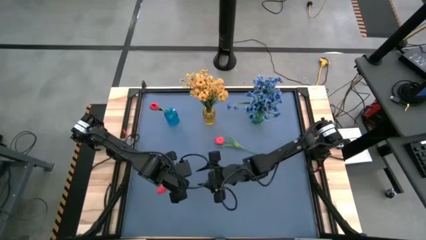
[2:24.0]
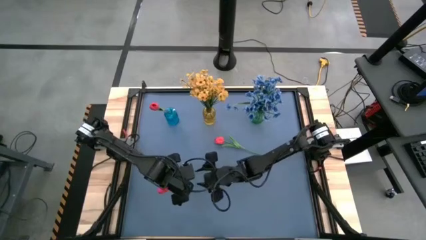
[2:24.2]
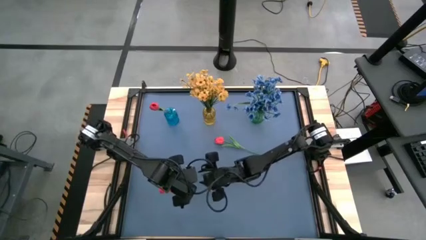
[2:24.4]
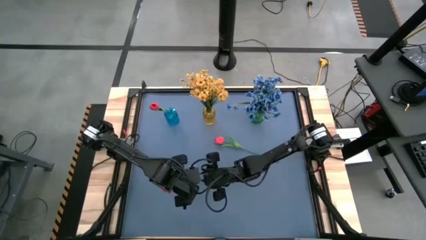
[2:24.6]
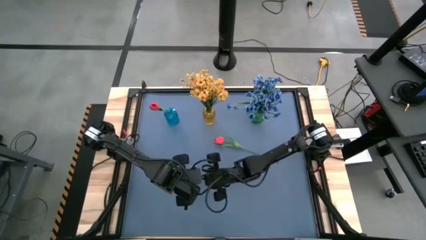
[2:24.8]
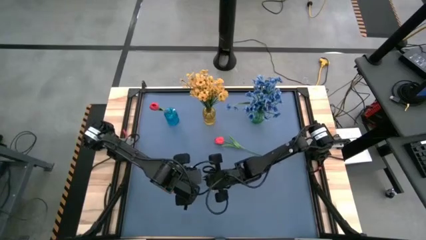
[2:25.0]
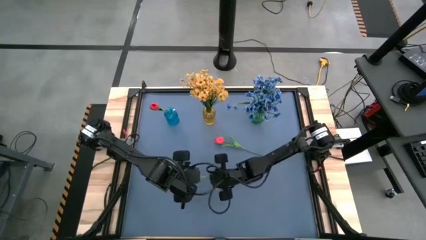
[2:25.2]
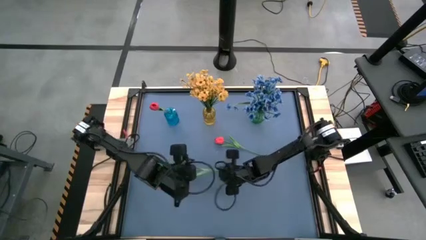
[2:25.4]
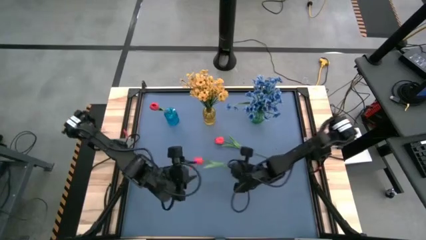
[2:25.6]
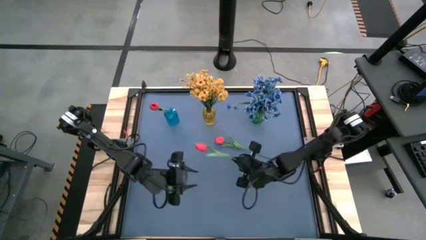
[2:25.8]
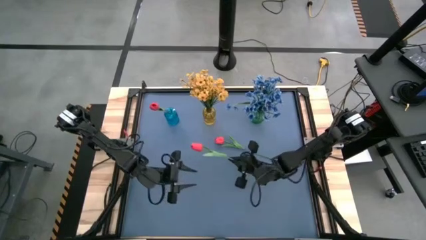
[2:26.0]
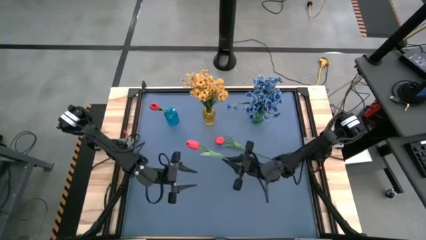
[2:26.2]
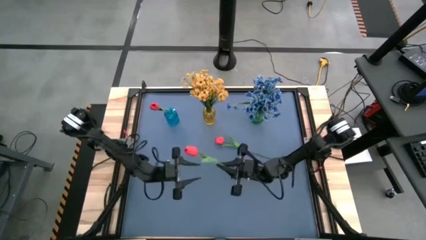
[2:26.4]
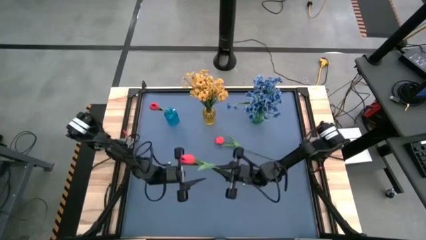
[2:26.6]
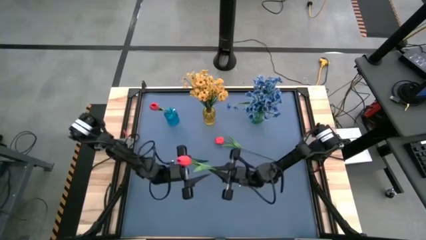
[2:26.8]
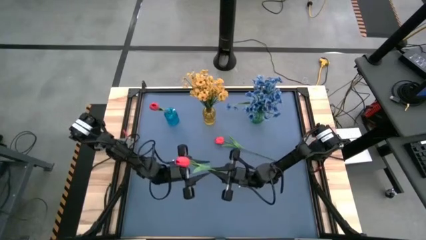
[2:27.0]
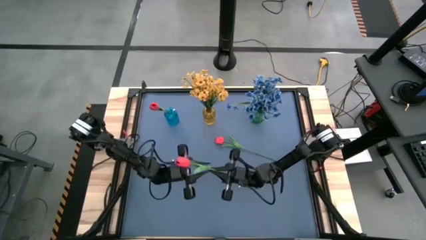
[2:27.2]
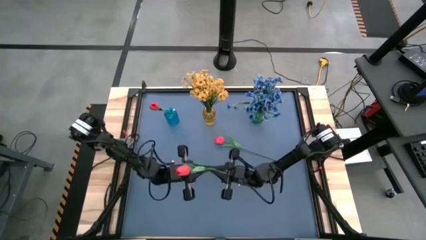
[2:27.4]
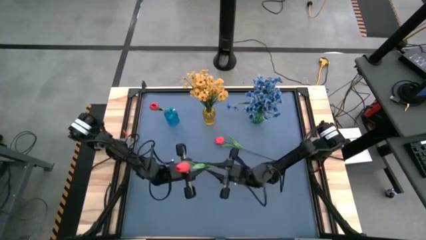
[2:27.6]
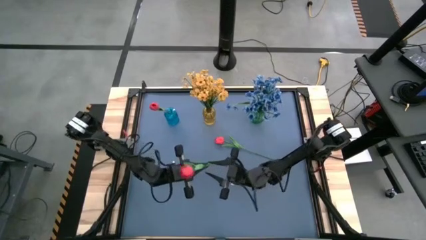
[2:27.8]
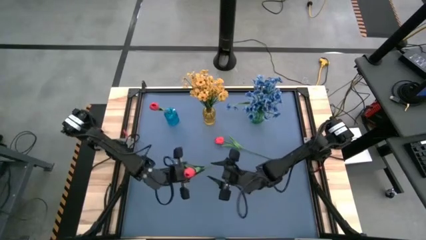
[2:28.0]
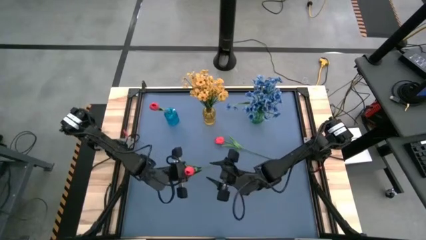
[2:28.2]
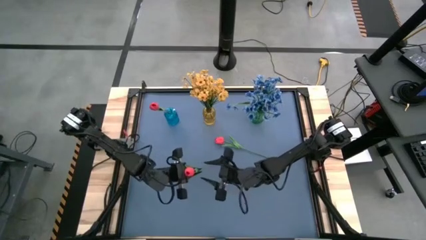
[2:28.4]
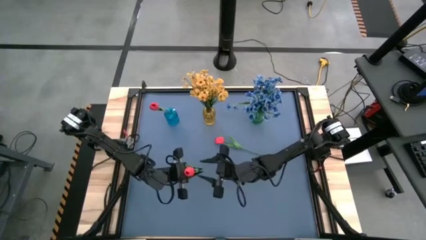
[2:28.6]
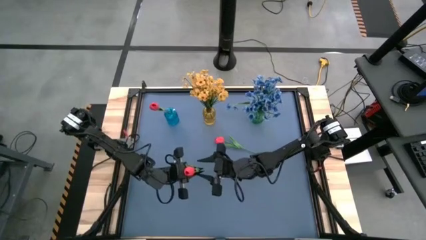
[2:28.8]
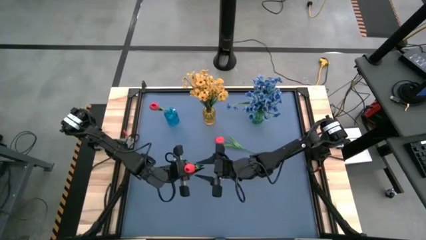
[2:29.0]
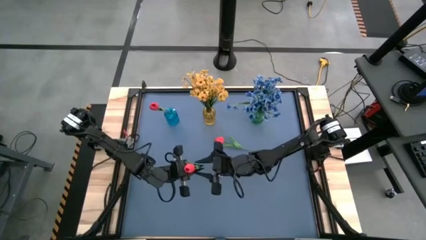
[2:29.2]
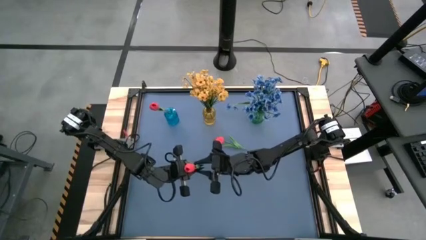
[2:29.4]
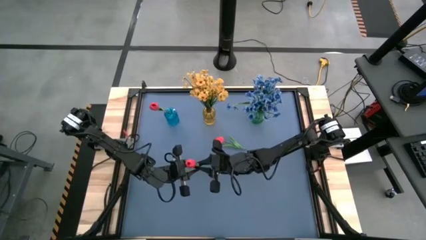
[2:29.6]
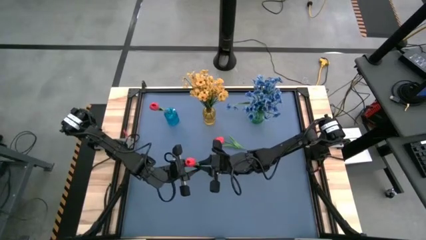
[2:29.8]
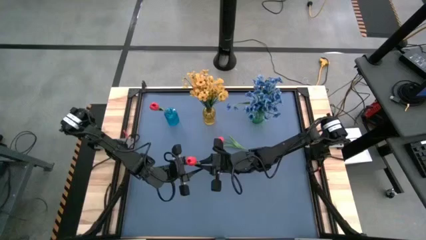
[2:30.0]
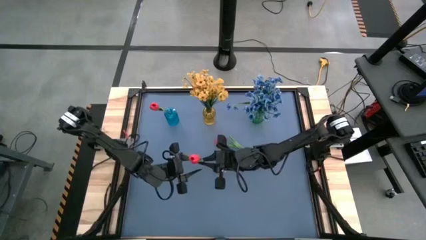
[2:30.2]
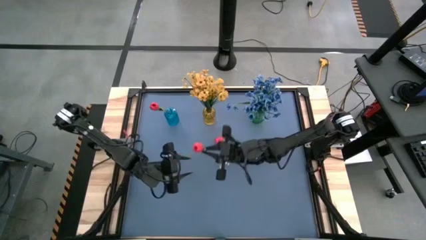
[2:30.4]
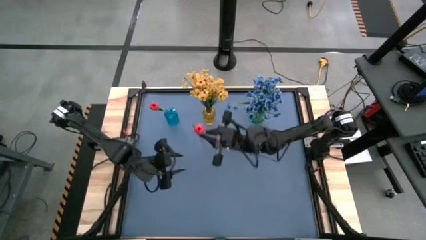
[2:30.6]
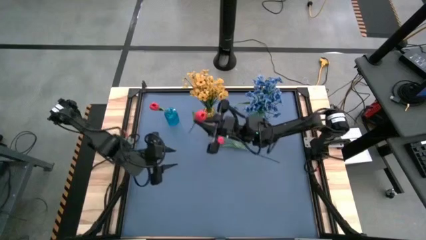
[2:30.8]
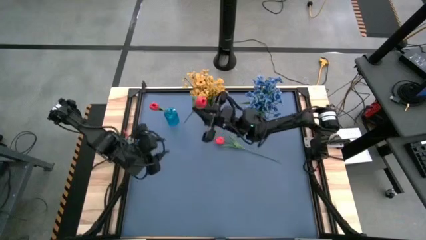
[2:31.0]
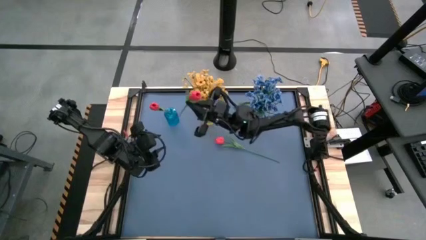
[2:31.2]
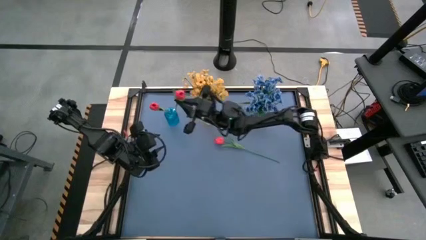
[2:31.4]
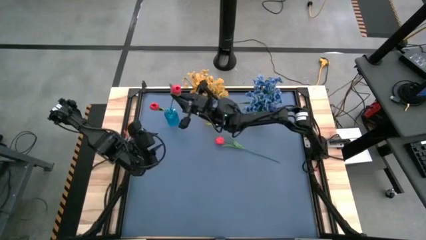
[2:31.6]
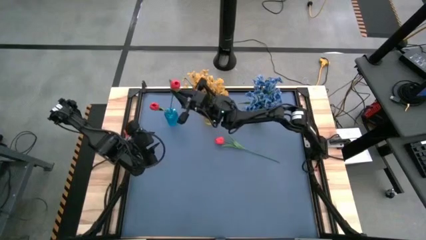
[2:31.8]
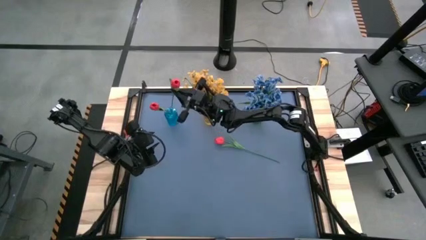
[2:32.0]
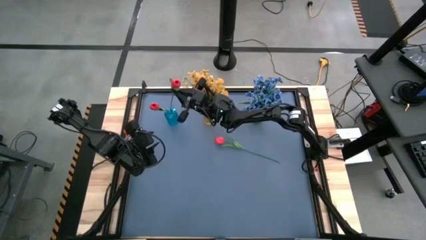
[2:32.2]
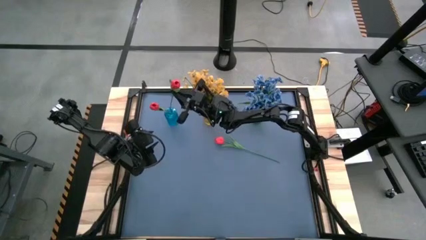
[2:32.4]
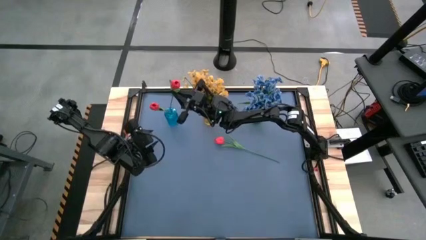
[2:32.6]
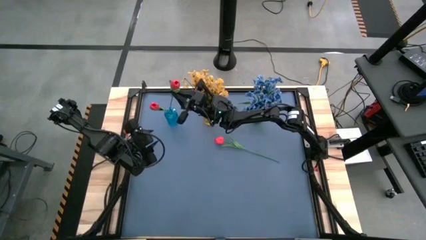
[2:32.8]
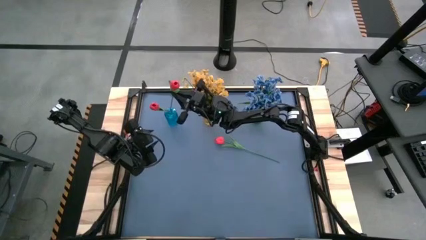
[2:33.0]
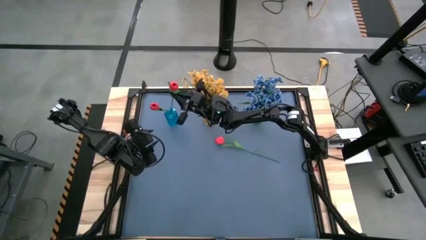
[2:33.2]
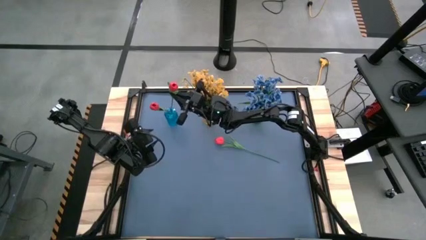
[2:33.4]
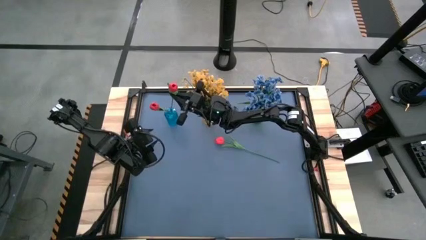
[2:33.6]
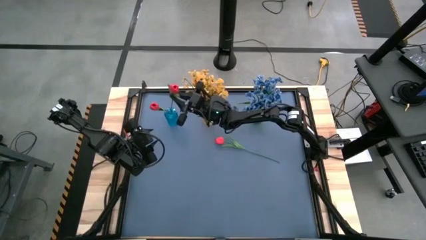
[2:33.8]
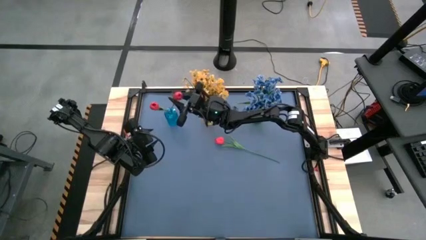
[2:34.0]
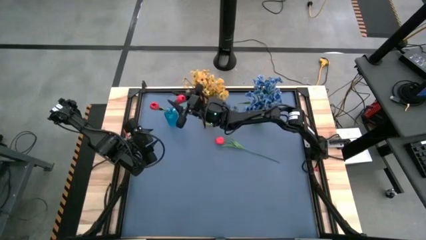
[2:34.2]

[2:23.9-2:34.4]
Task: Sort flowers into vase by color
Put the bottom red tulip into the blue vase
